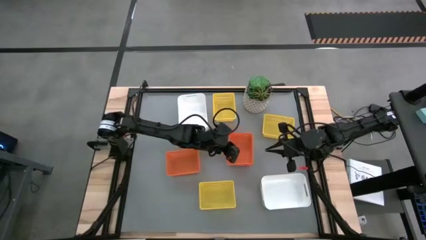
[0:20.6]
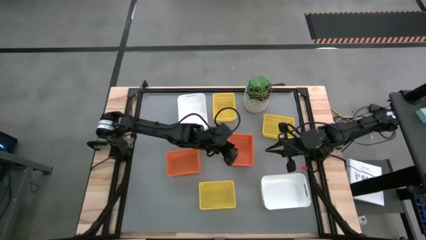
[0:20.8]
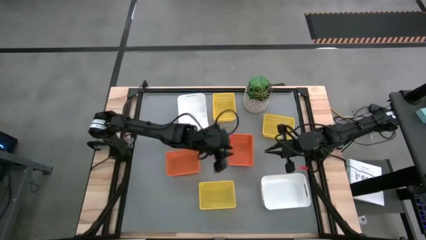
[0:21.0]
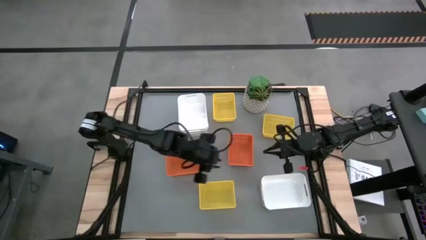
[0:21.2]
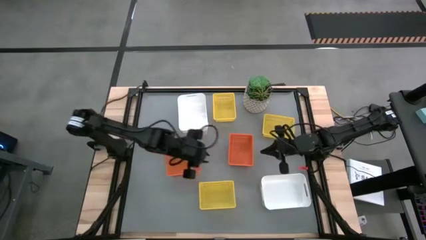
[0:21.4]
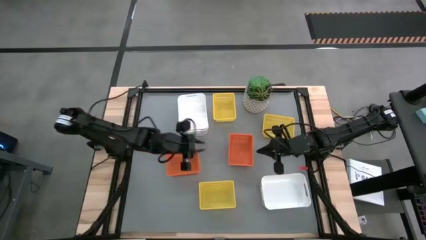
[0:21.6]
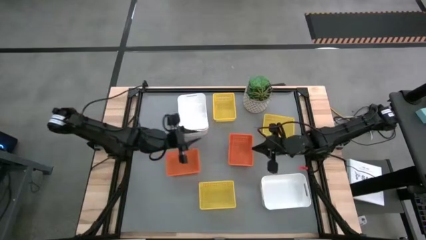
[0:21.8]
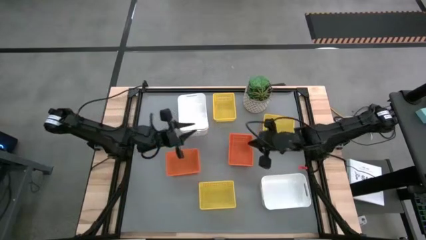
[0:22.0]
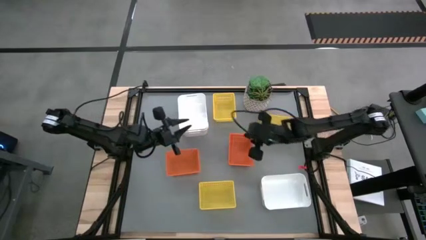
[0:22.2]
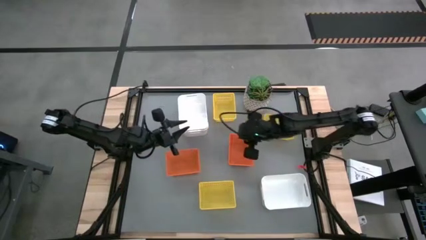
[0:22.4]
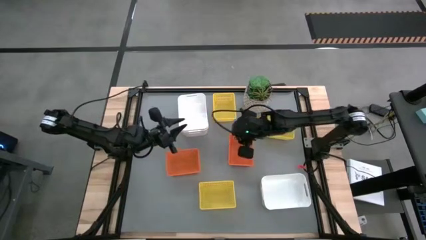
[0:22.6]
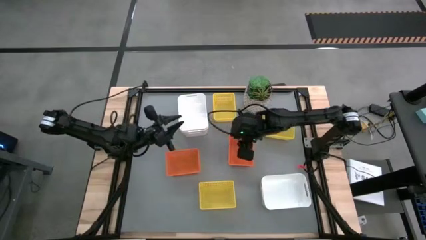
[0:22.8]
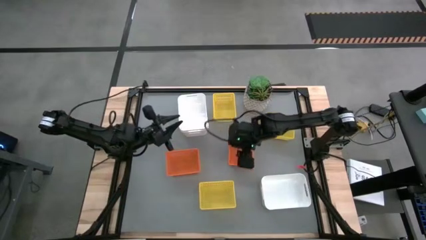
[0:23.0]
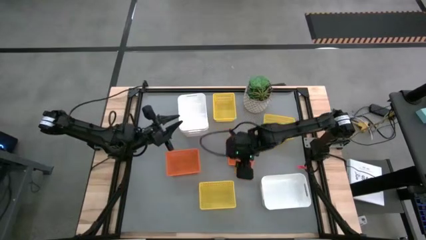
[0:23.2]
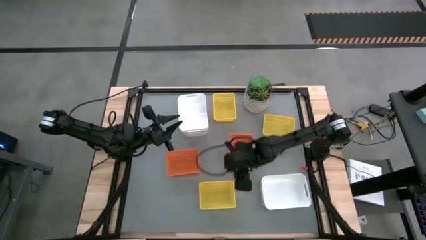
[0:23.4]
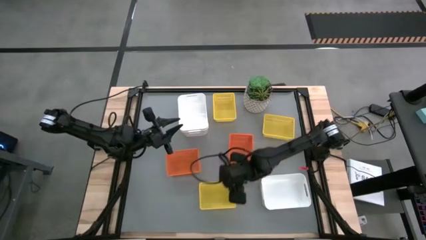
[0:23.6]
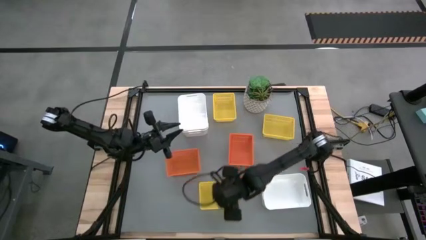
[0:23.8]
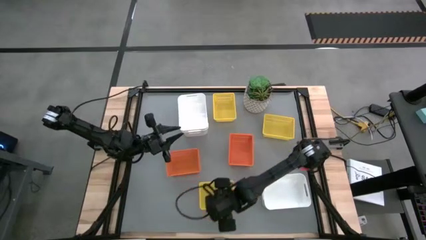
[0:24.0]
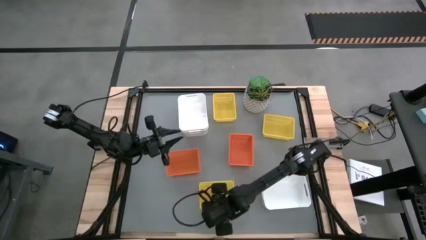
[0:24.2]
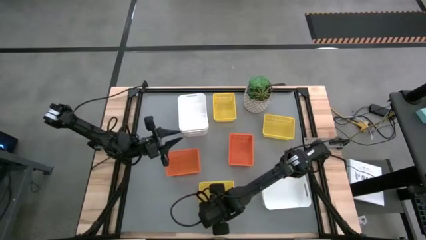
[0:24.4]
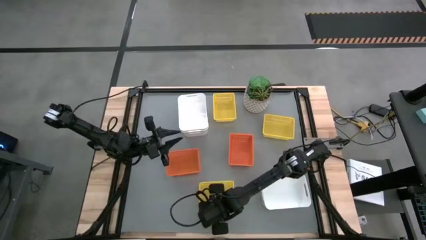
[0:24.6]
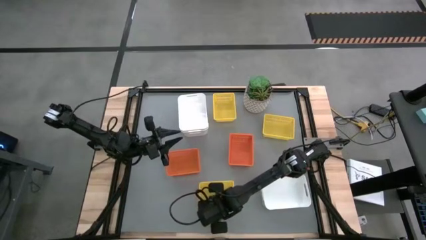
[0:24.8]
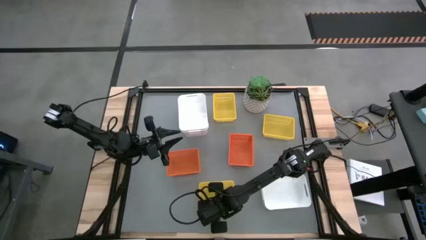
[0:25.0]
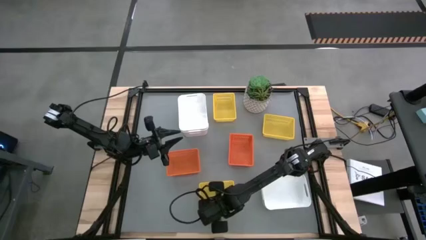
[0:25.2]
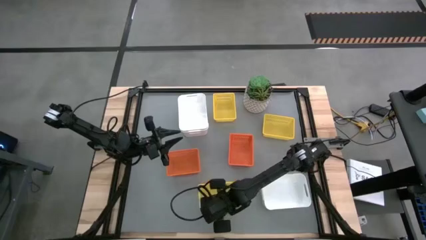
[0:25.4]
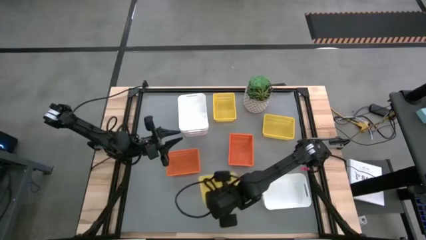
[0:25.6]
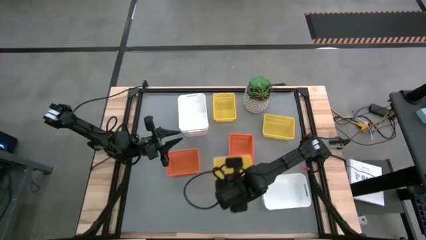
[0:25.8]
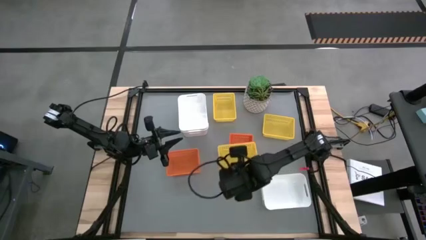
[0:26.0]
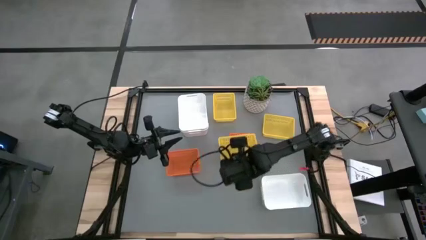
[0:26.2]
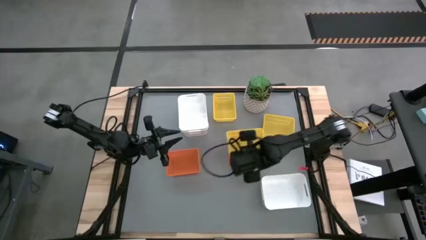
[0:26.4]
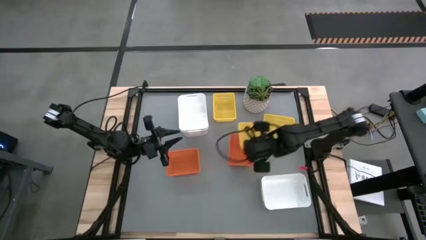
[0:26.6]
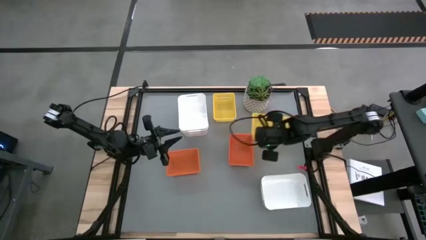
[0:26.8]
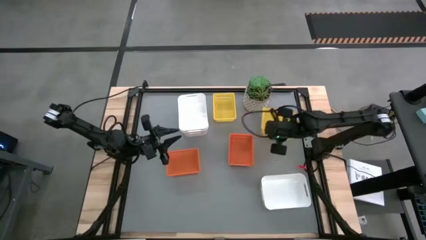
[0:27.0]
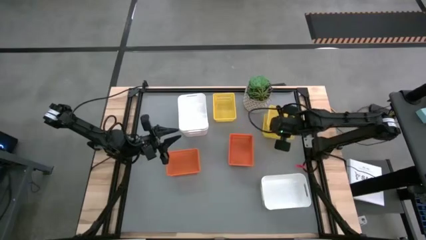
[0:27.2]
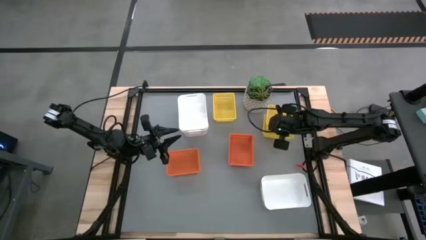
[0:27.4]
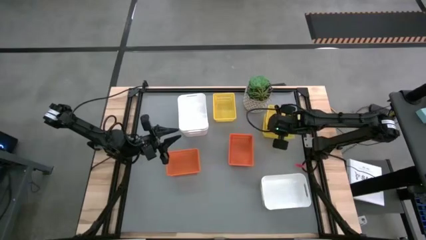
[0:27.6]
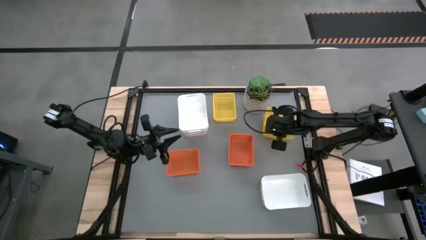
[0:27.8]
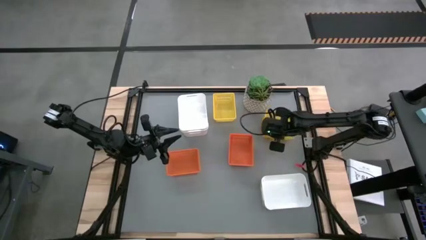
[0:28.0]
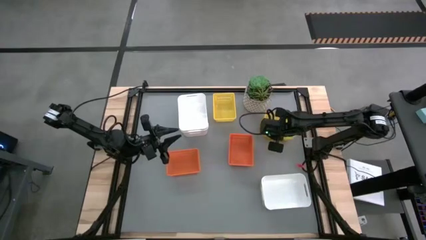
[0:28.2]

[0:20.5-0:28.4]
Stack the bottom yellow bin on top of the top right yellow bin

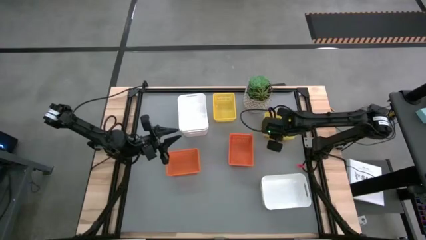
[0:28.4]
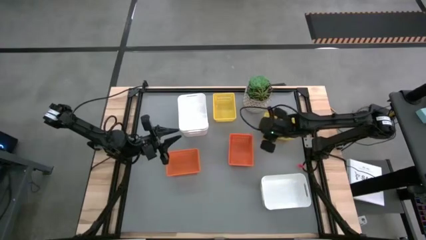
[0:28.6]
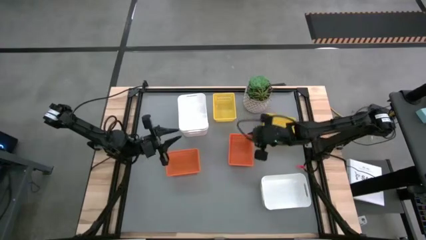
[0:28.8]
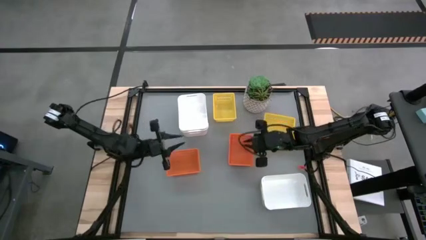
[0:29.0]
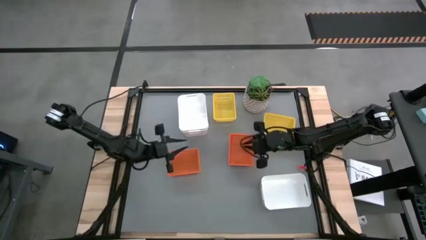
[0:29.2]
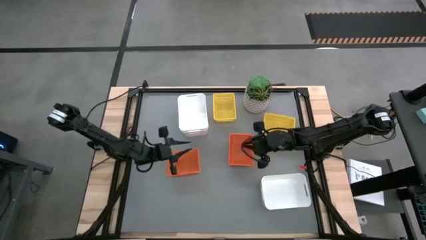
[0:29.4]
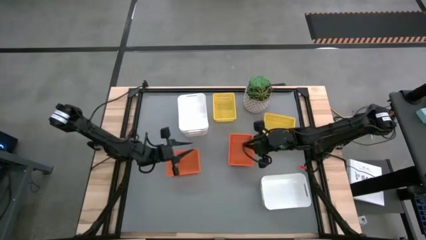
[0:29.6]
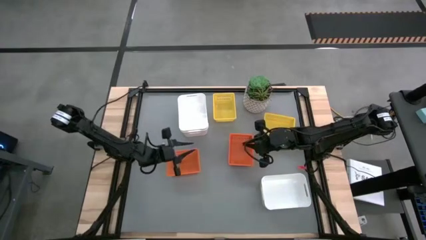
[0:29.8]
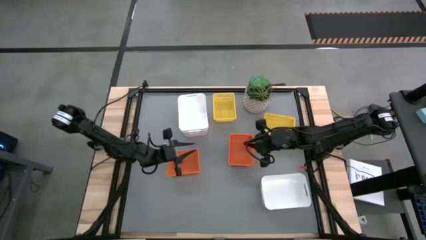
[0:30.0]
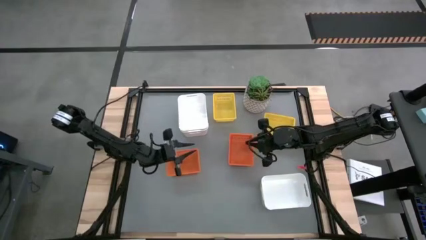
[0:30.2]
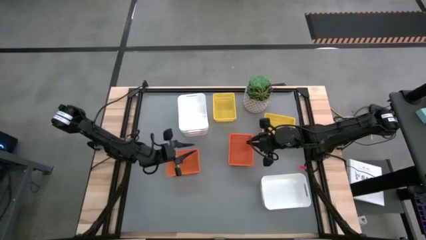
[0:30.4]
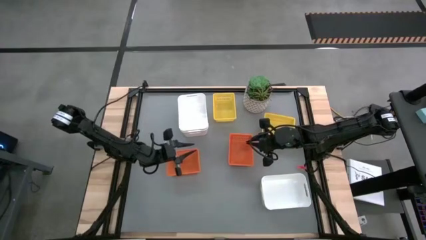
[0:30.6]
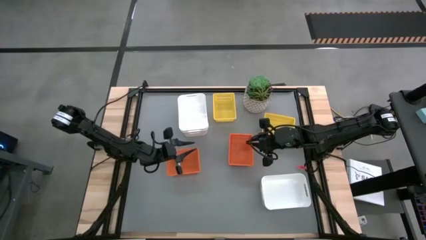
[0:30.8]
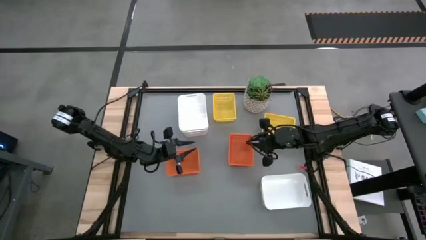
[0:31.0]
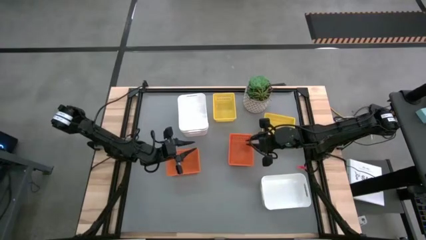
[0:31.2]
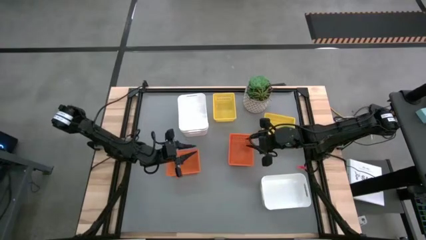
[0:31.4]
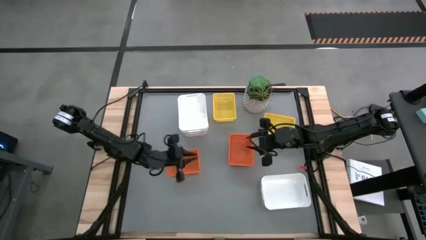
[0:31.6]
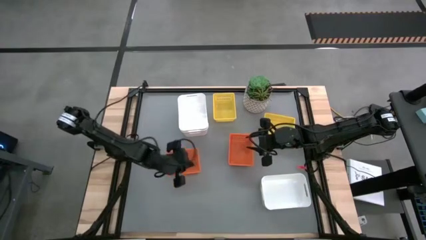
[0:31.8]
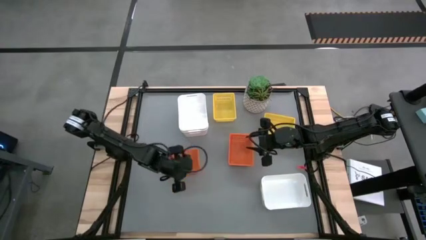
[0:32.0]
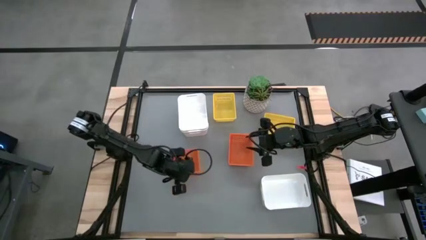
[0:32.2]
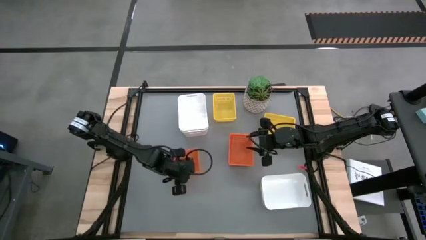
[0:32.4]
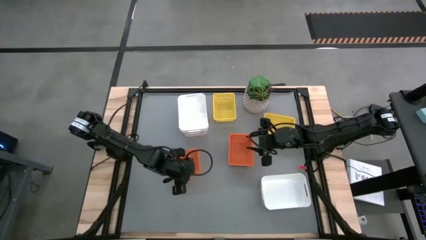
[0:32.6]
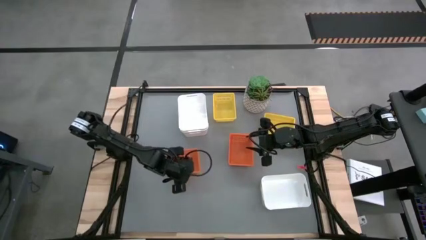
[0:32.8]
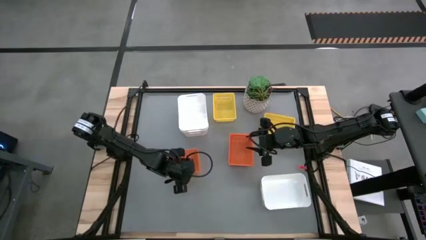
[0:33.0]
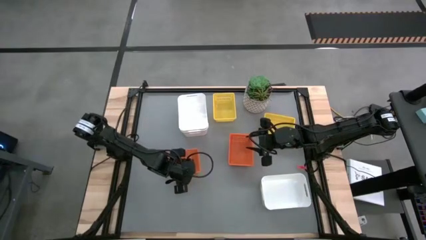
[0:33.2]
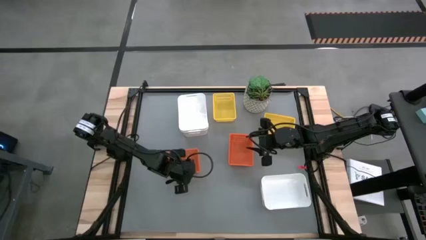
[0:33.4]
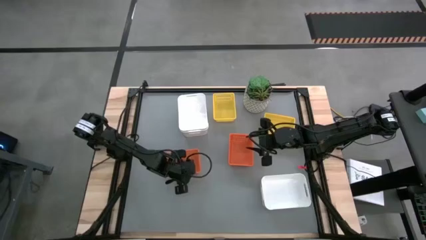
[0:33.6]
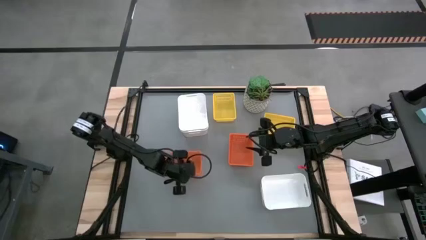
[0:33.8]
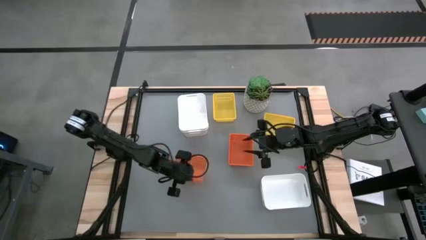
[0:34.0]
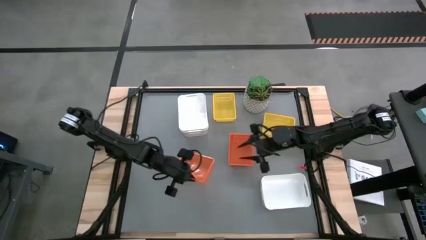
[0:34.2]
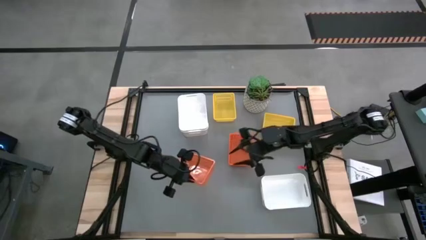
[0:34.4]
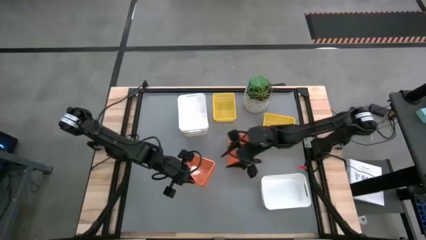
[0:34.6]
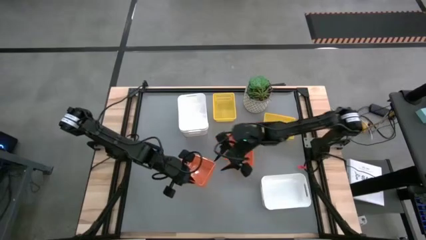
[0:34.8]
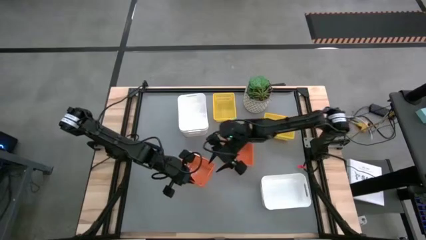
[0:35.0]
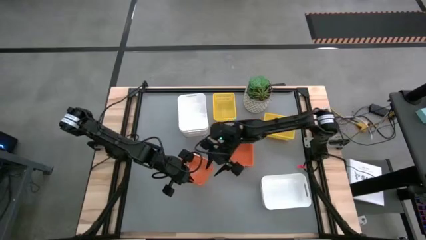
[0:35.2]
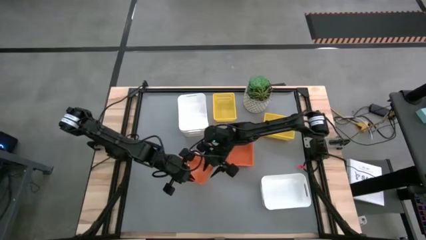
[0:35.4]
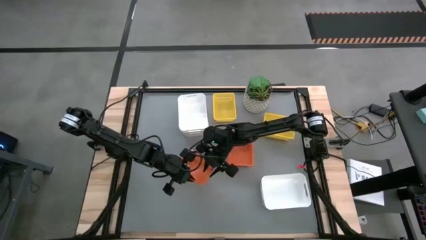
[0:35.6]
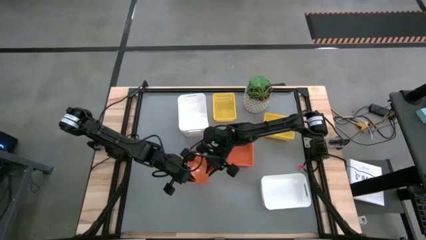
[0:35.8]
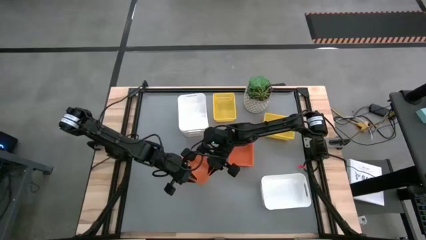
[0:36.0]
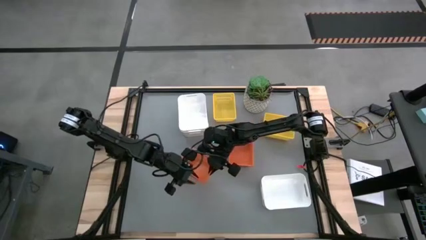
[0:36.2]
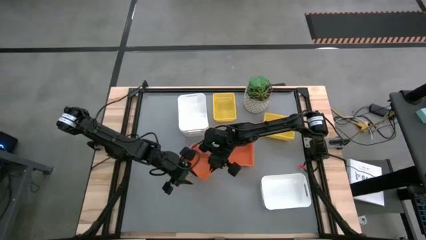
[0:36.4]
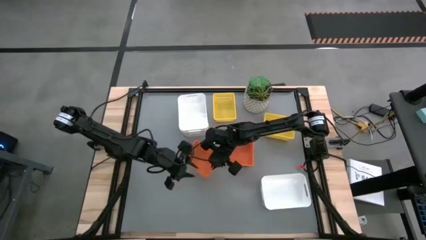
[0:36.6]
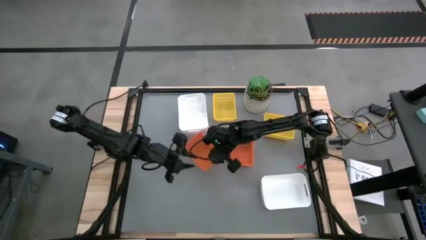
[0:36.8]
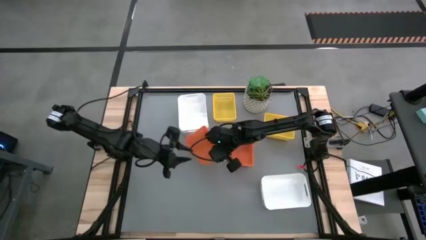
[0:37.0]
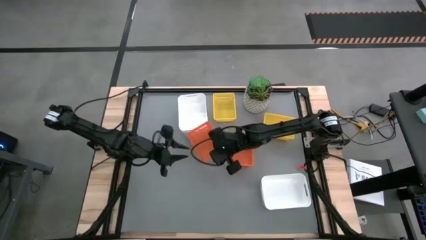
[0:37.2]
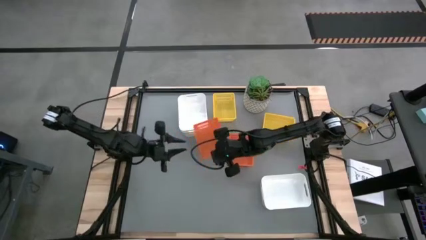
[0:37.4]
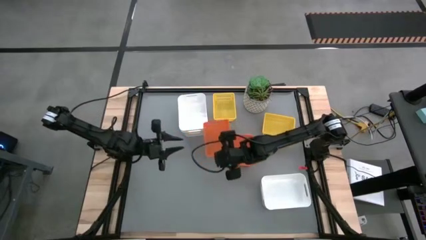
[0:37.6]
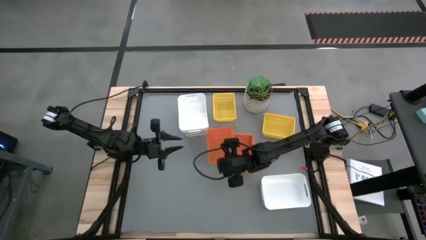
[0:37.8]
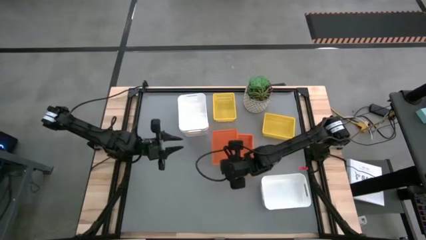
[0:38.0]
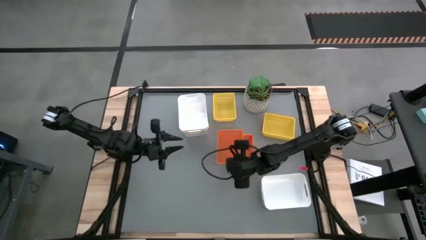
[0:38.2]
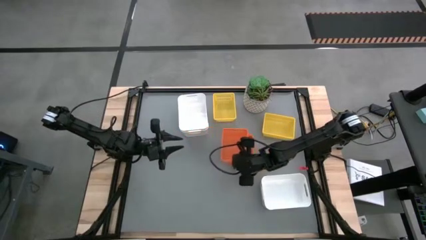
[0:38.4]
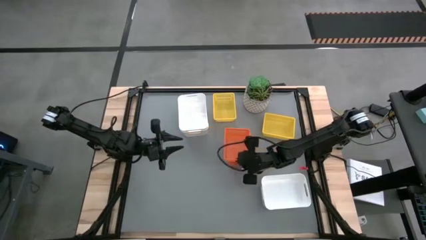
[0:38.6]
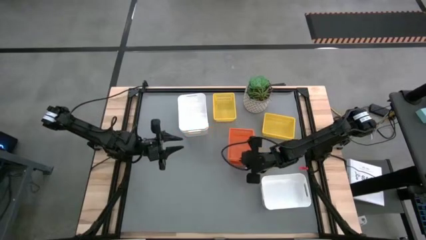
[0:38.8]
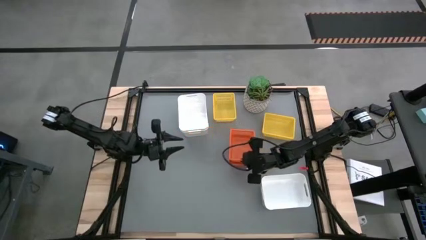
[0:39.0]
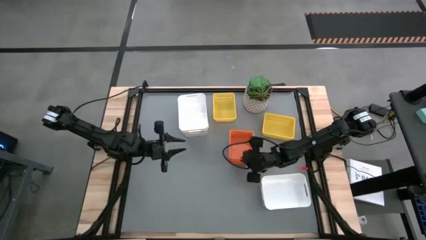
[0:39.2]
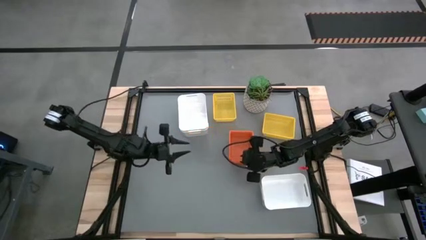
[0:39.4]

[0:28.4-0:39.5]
Stack the left orange bin on top of the right orange bin
